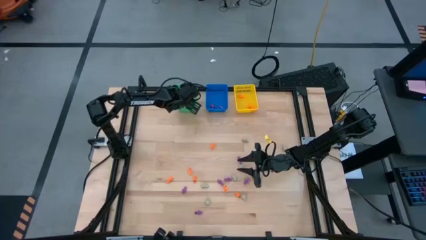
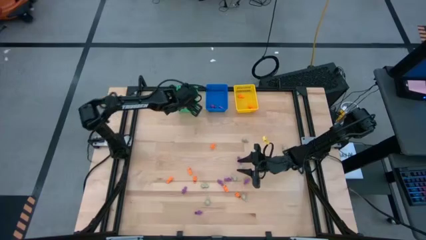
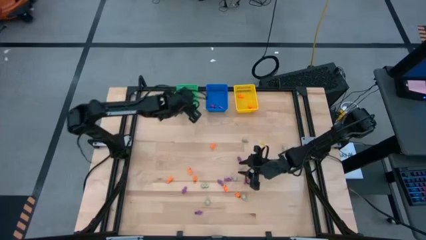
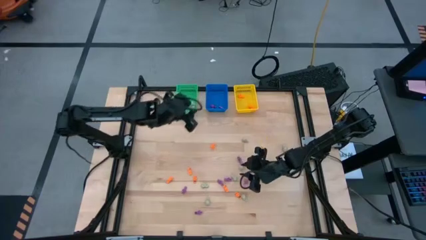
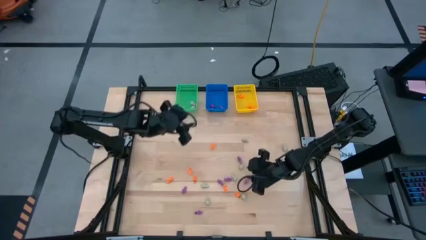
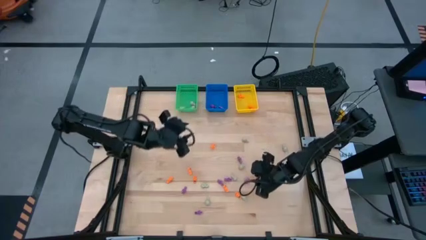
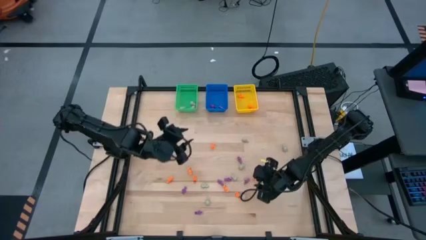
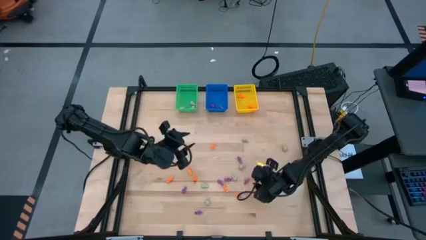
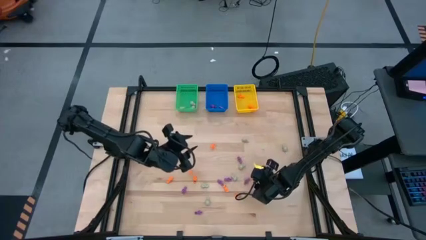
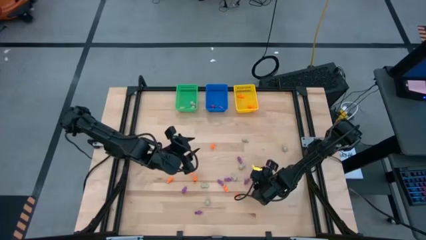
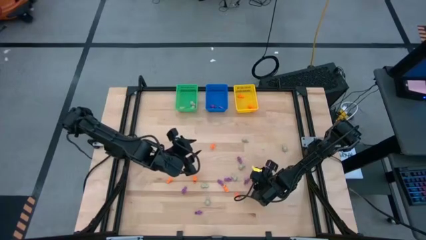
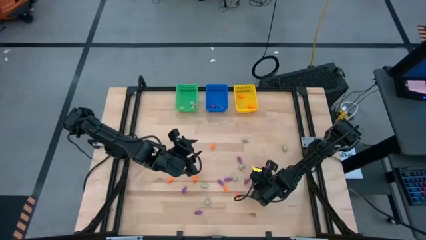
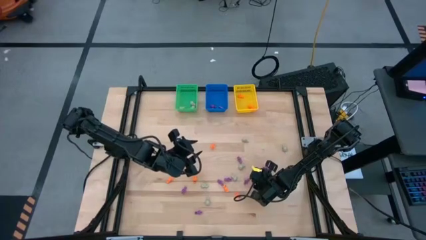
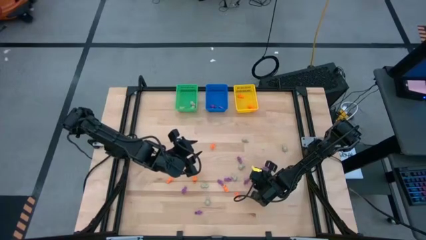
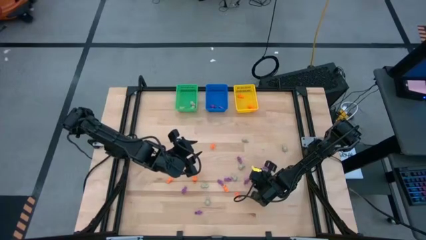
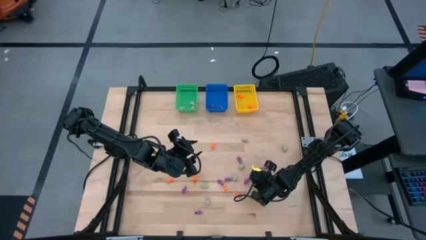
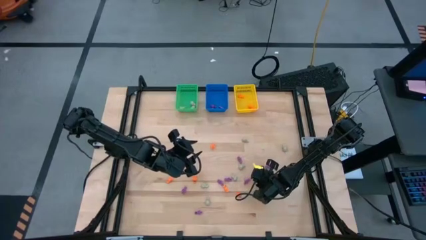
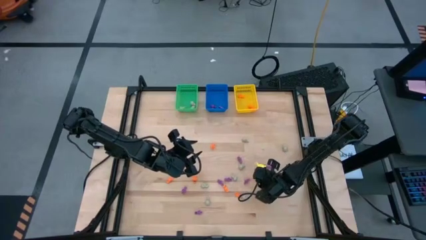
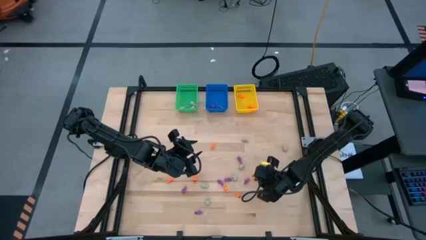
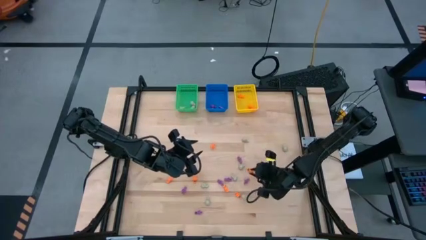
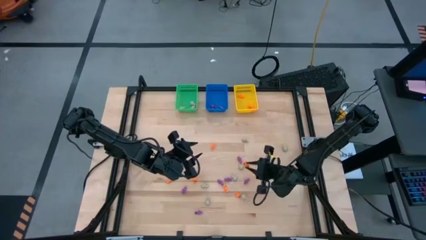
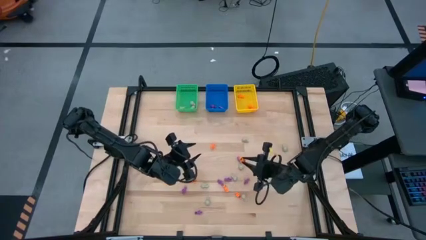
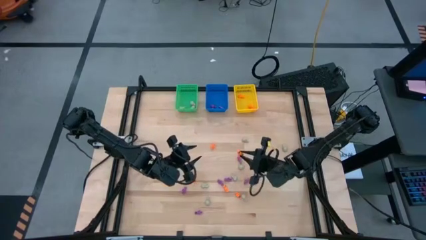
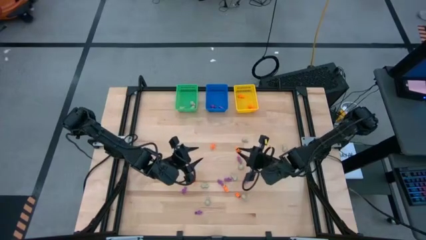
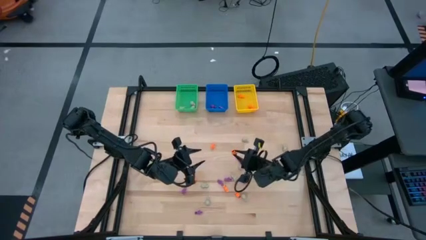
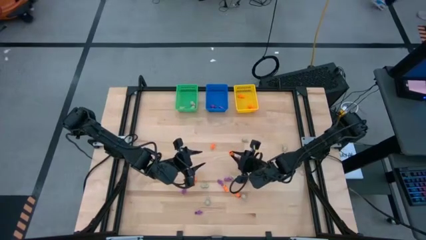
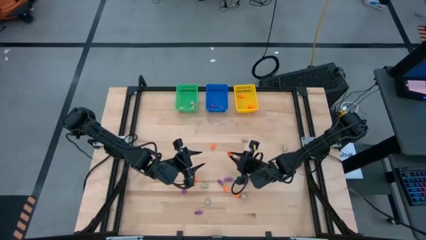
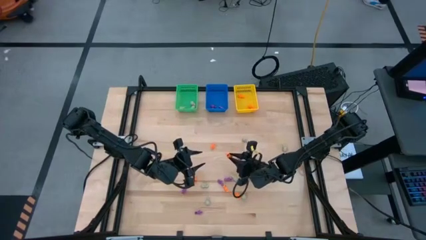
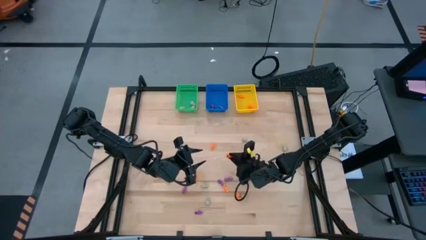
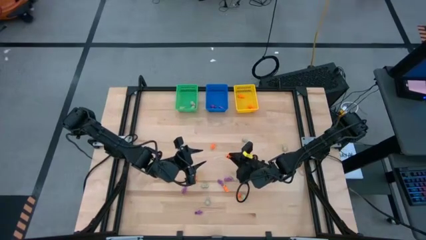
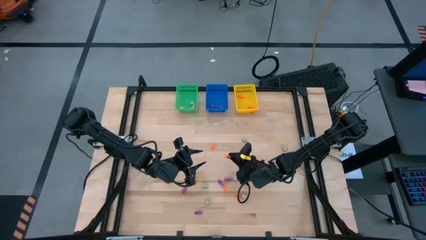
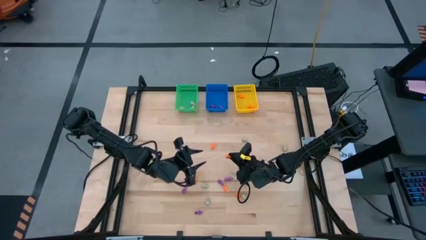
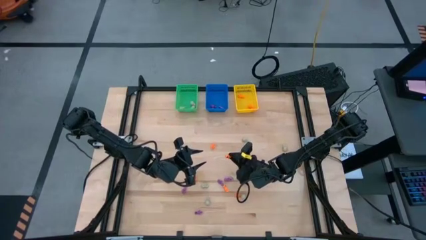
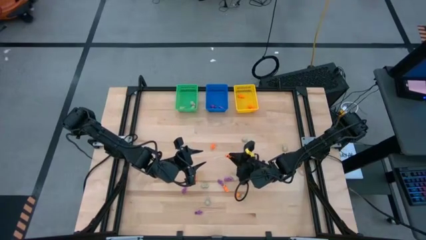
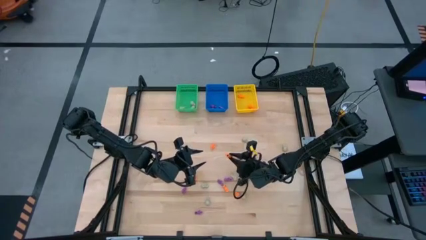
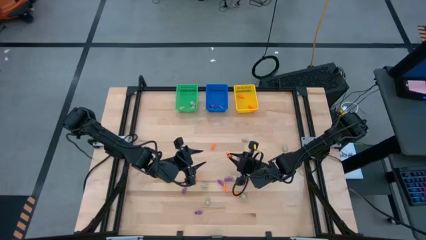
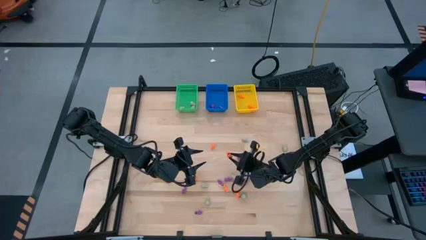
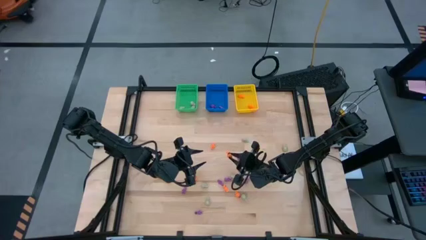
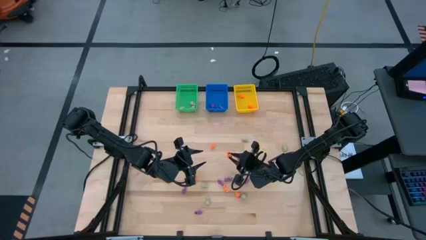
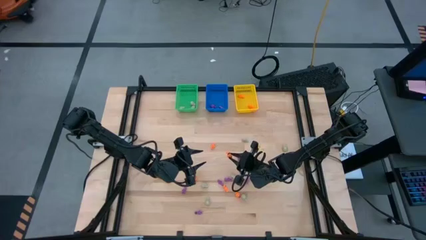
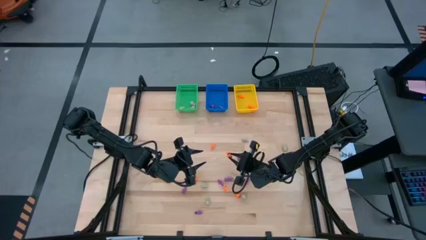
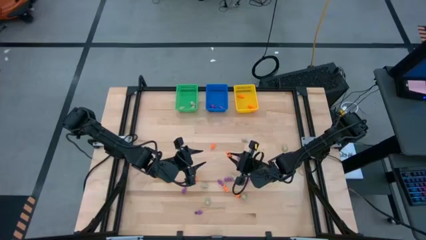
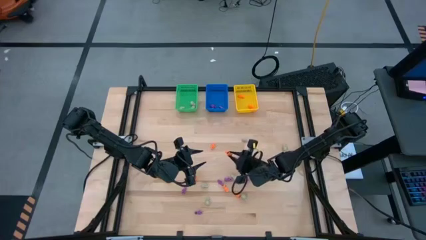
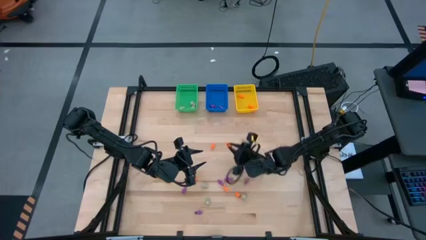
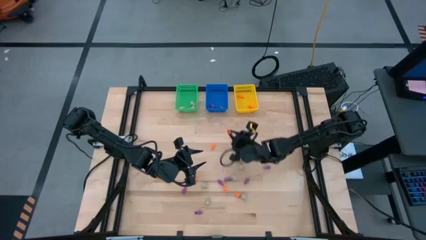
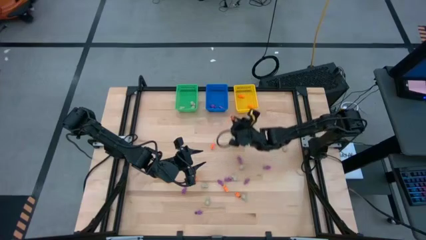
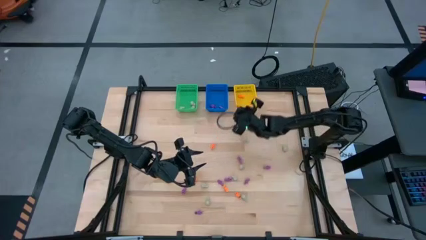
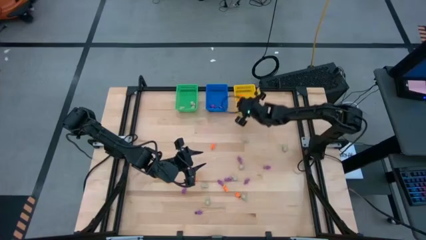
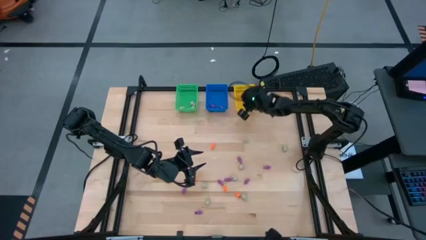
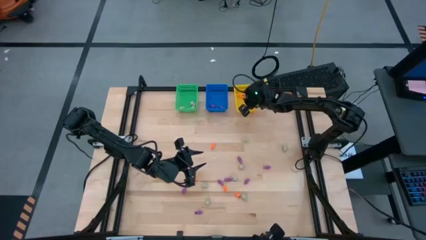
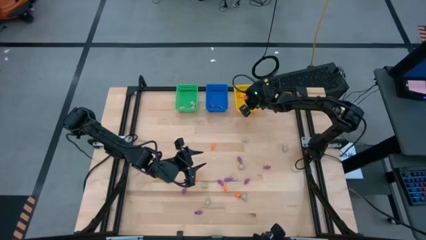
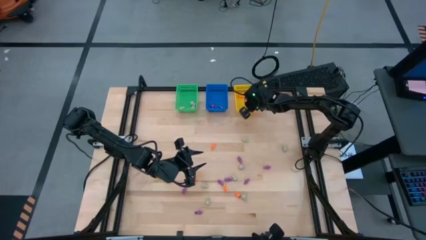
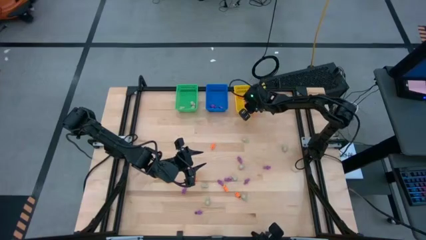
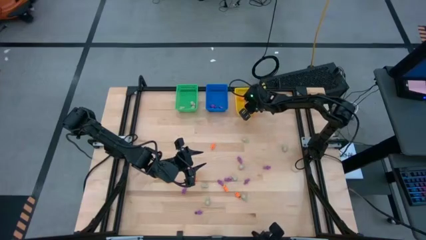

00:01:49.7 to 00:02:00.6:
Task: Sort Halloween decoration
Put the orange skeleton toy into the yellow bin

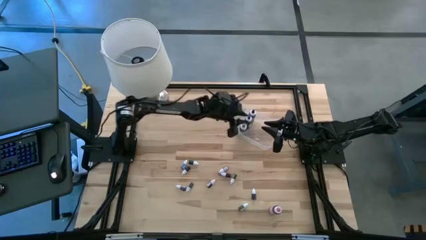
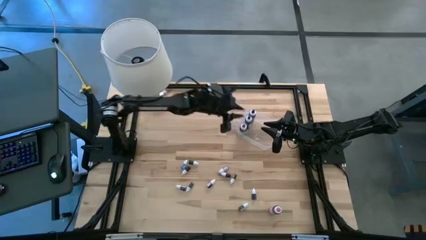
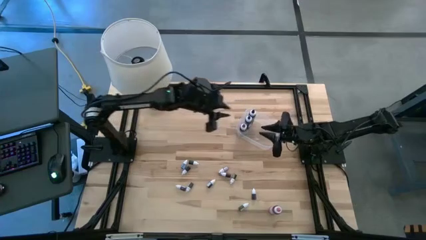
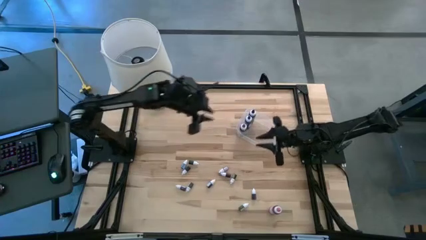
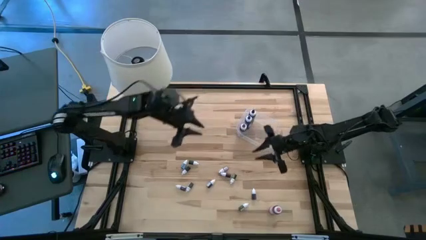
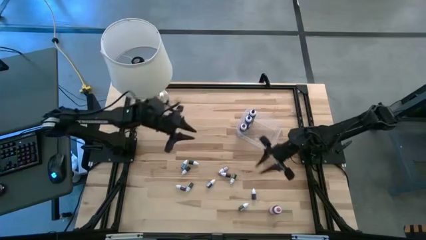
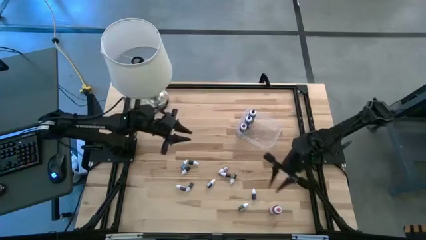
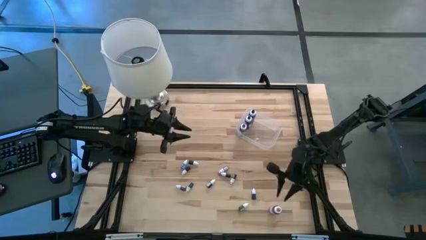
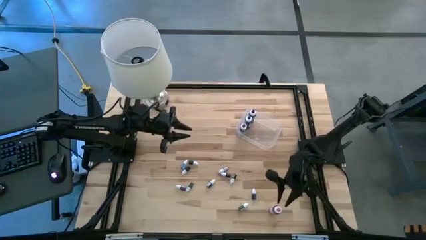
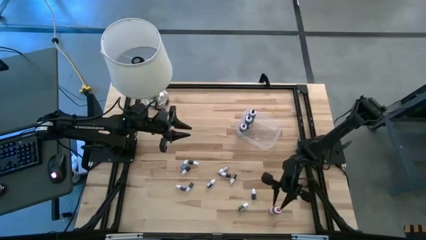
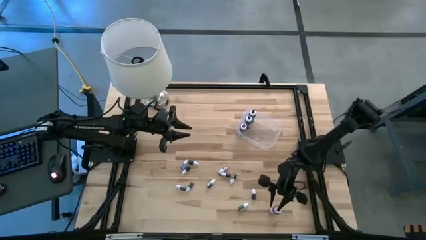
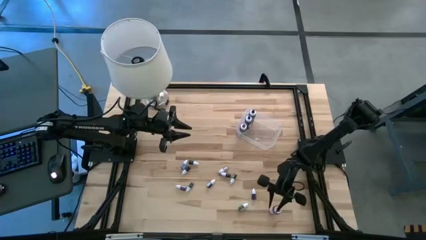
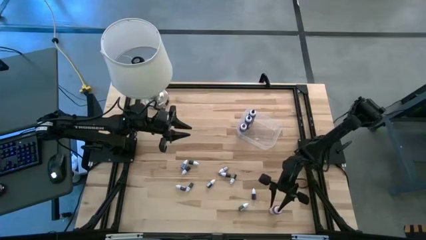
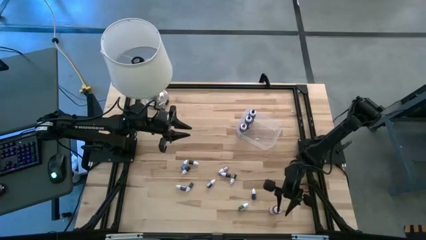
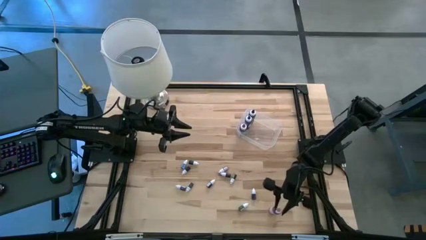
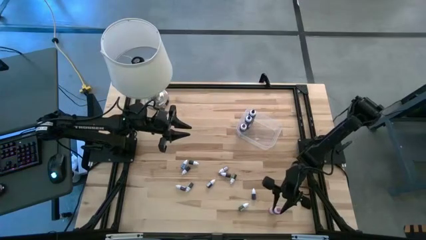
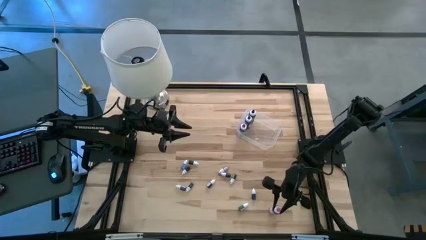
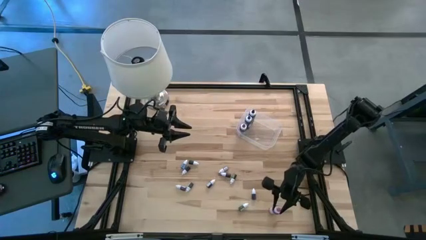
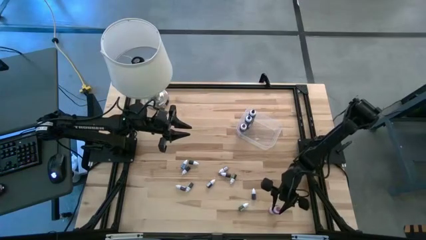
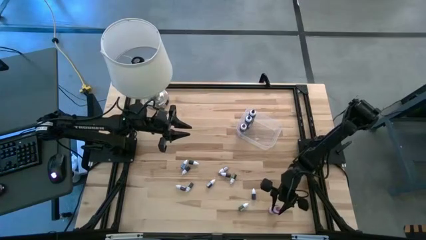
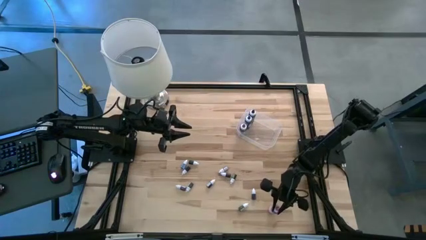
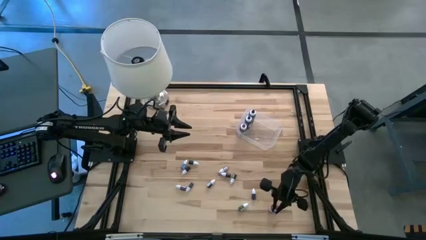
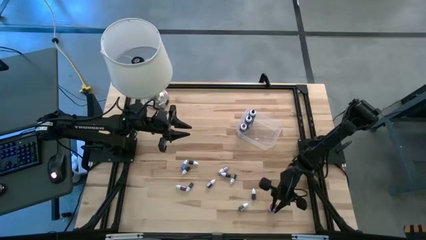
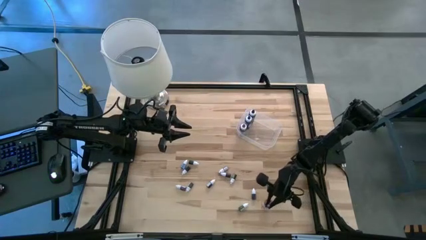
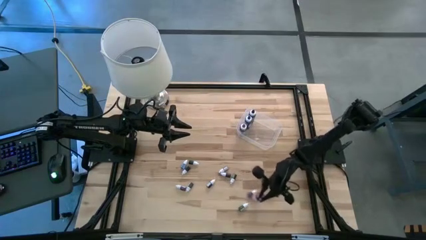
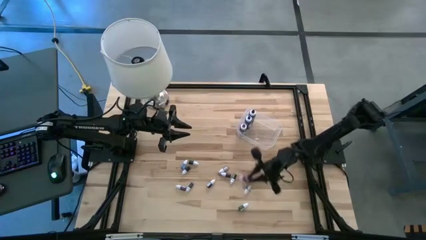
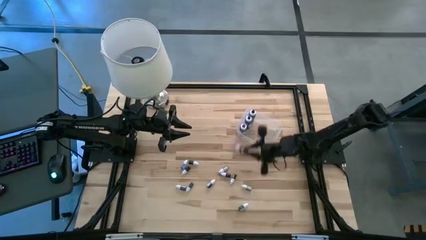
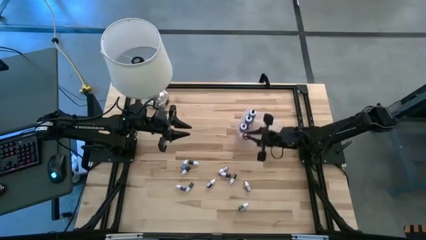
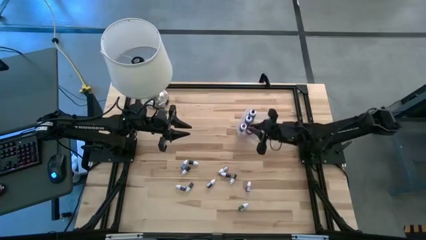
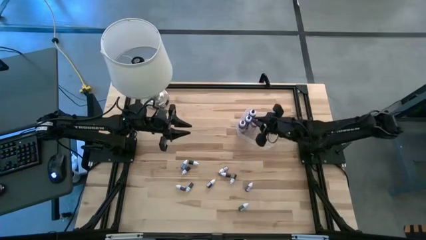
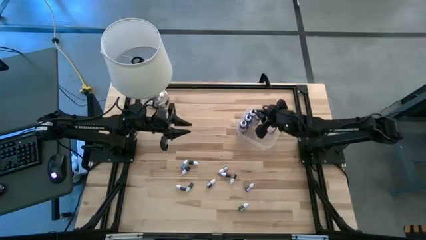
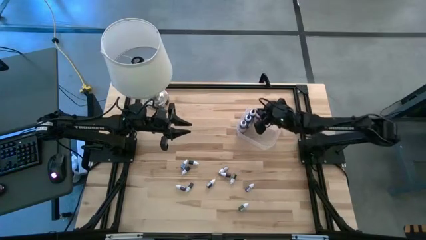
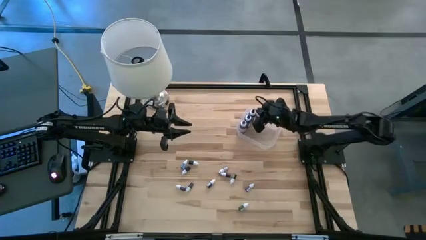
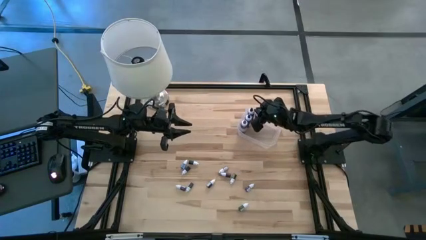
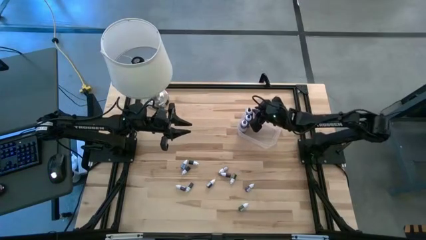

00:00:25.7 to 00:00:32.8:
Task: Pick & Place food coloring
Put the large pink food coloring bottle into the transparent bin
